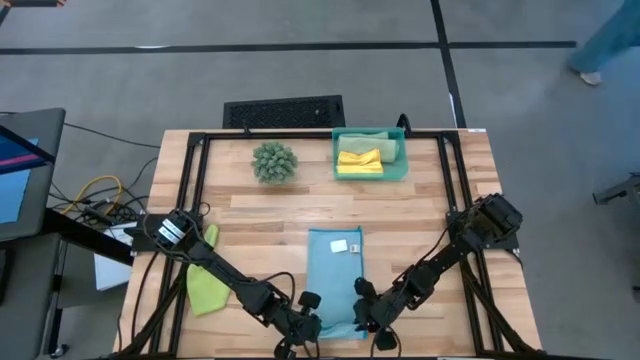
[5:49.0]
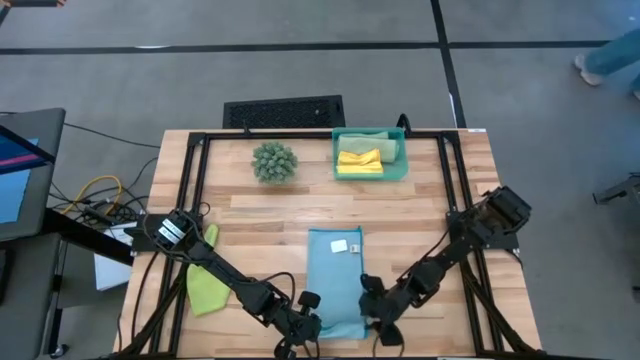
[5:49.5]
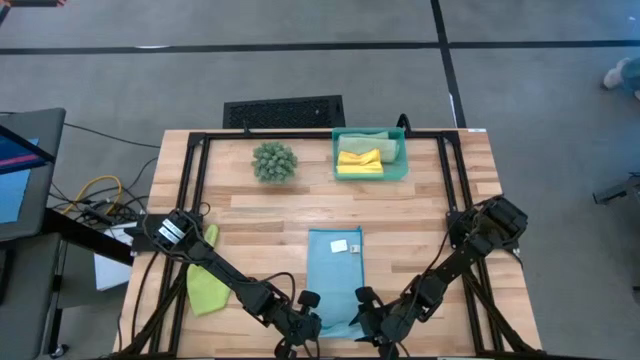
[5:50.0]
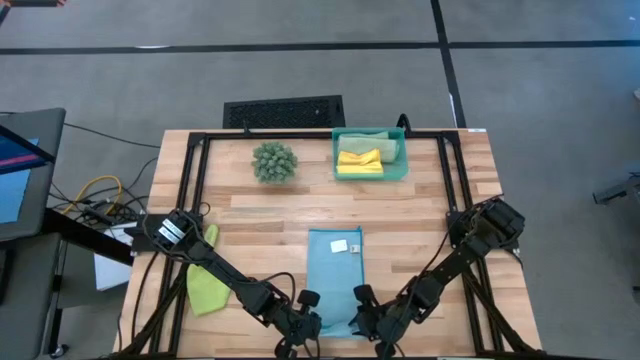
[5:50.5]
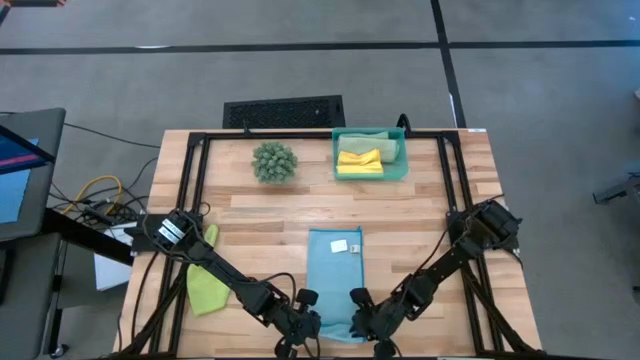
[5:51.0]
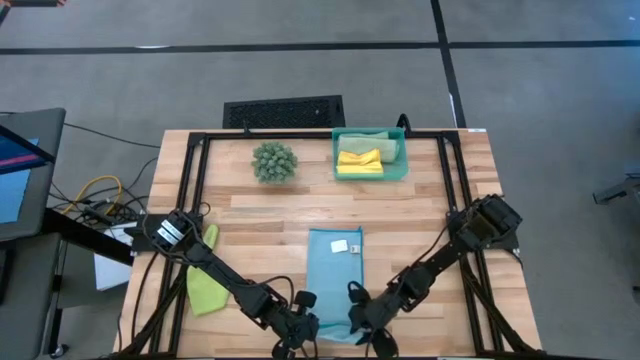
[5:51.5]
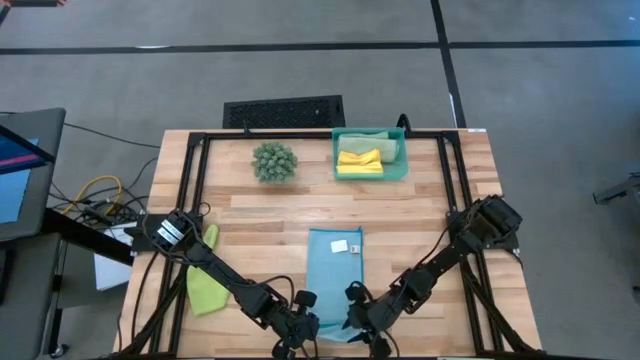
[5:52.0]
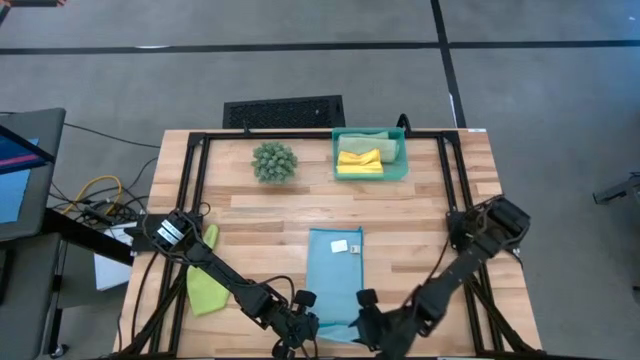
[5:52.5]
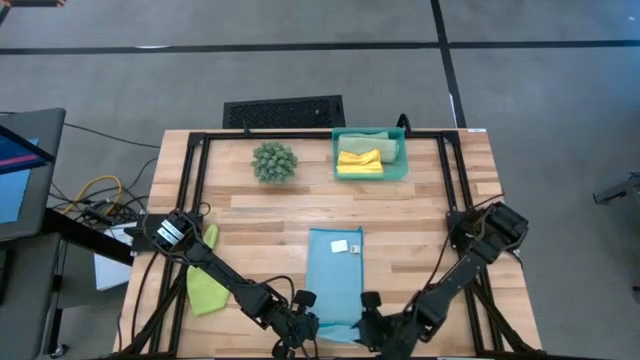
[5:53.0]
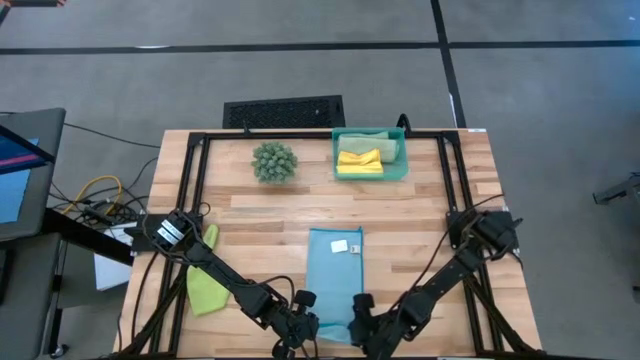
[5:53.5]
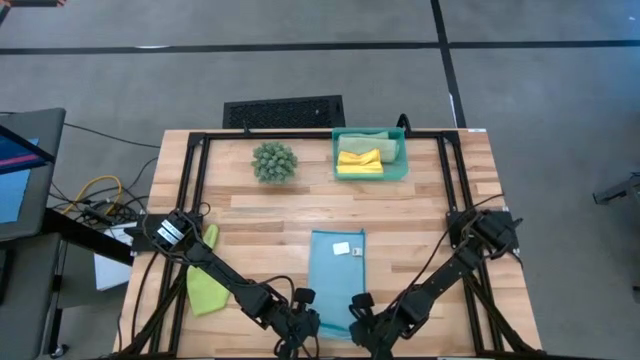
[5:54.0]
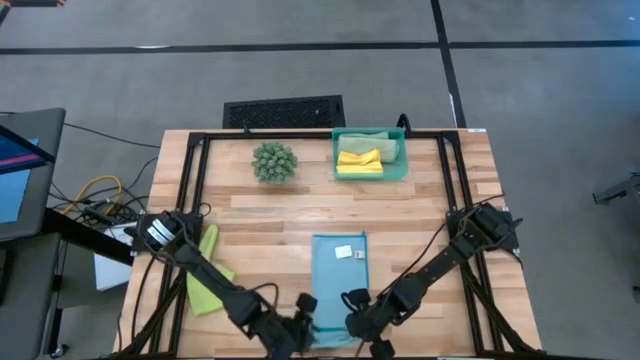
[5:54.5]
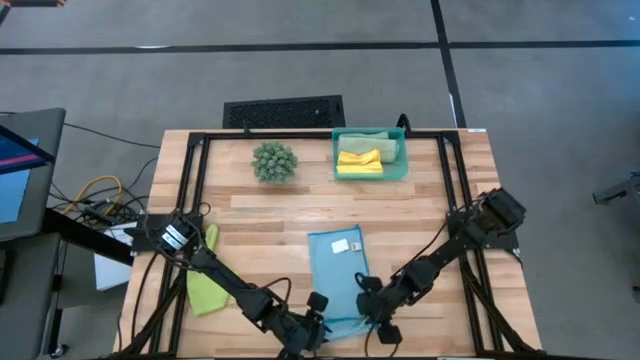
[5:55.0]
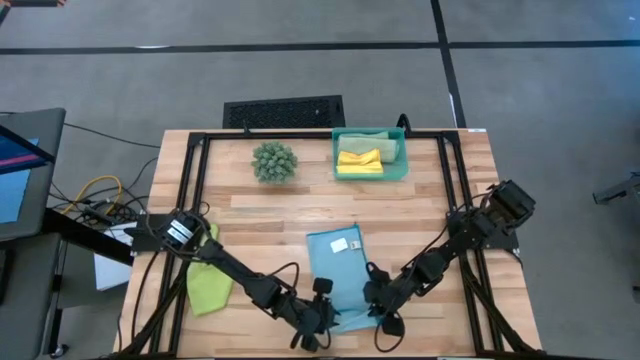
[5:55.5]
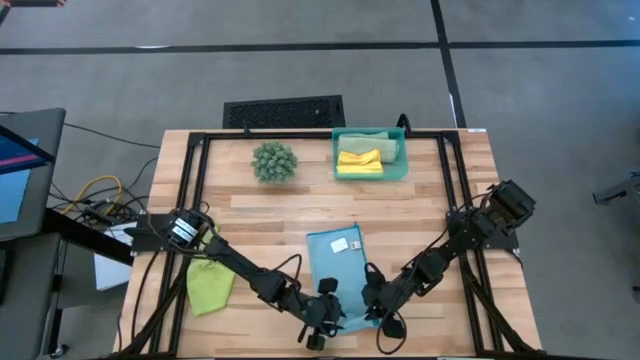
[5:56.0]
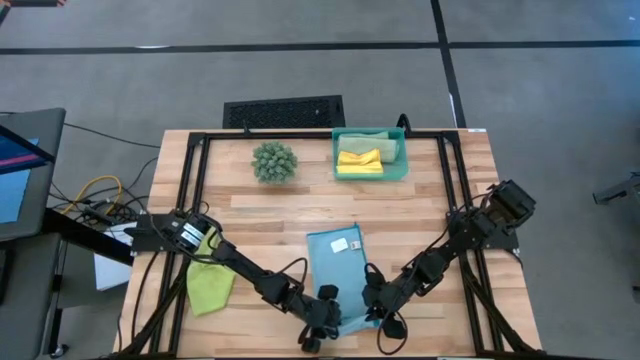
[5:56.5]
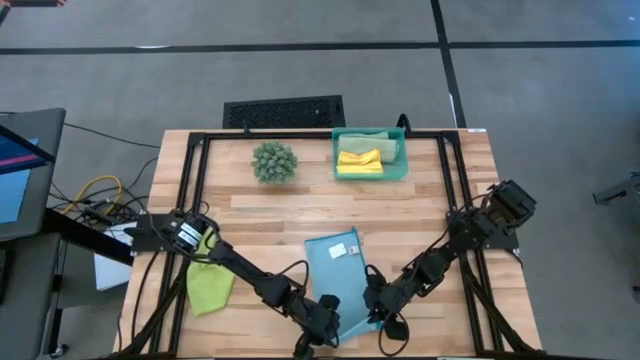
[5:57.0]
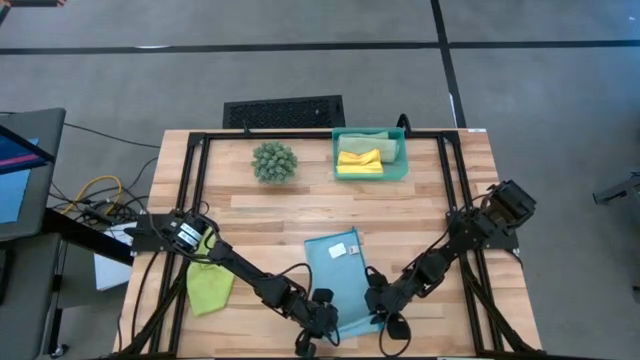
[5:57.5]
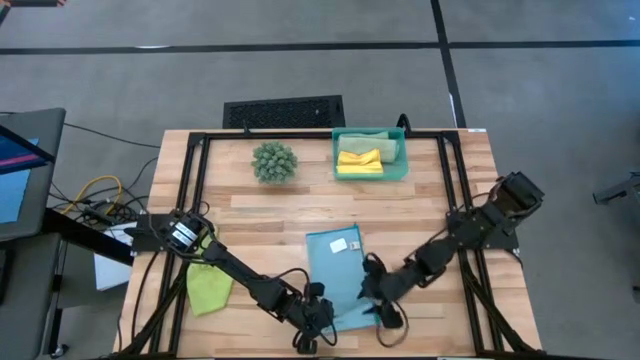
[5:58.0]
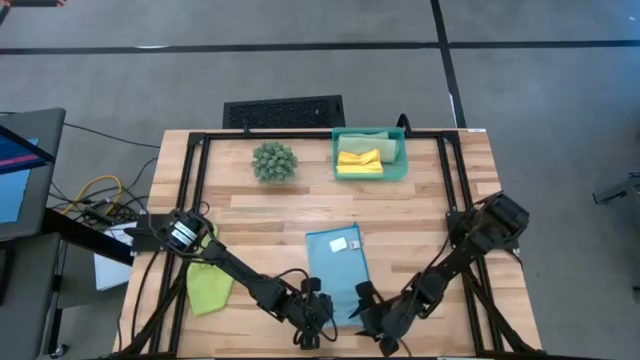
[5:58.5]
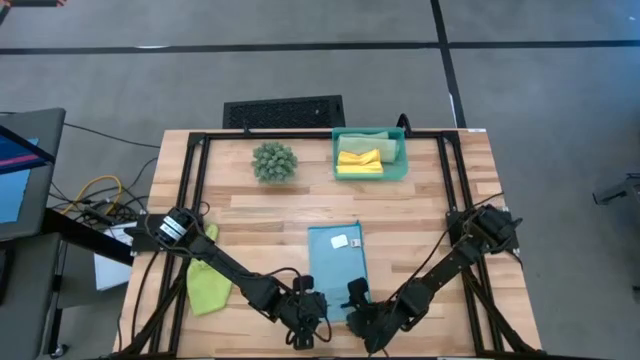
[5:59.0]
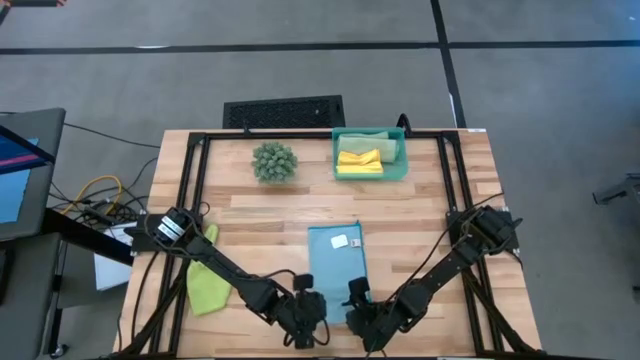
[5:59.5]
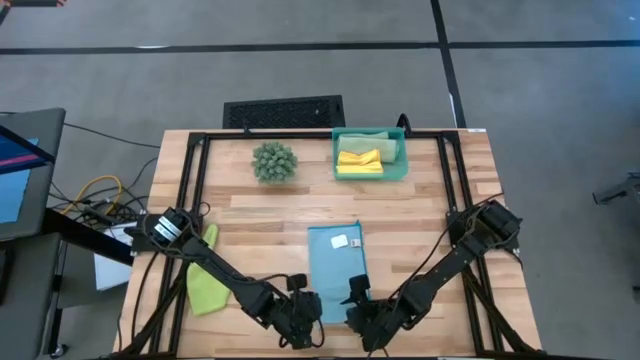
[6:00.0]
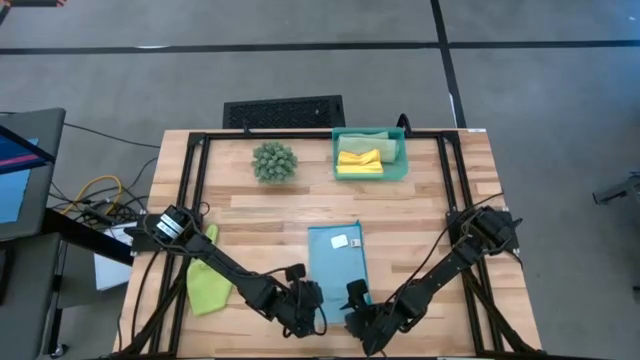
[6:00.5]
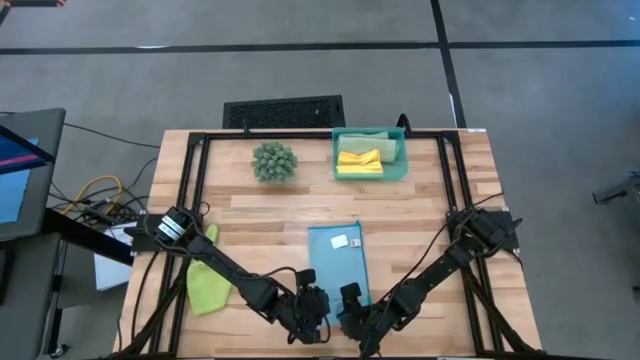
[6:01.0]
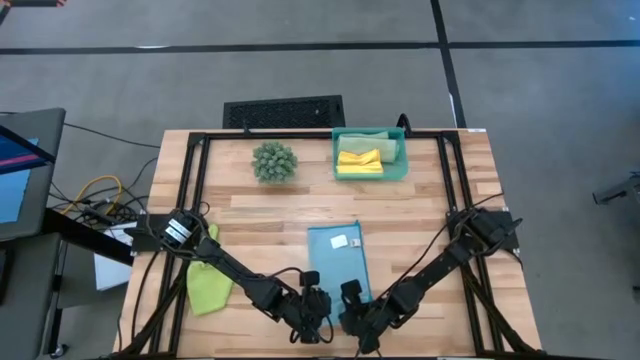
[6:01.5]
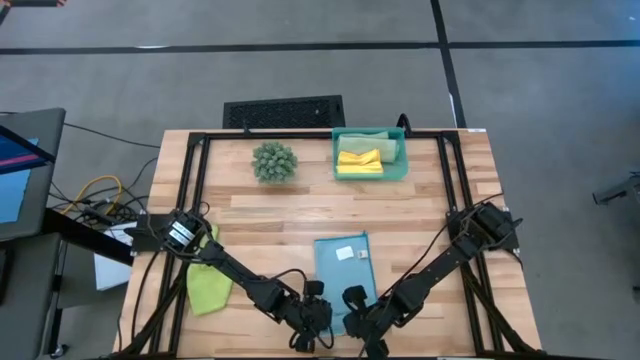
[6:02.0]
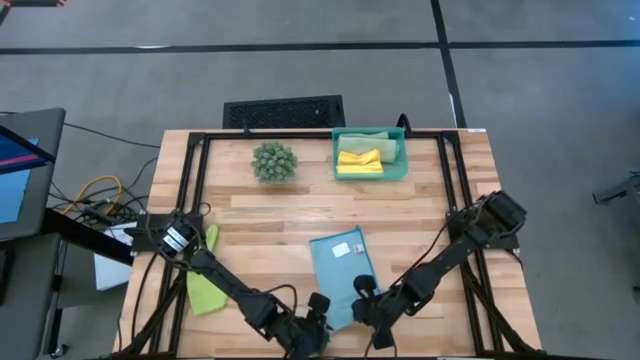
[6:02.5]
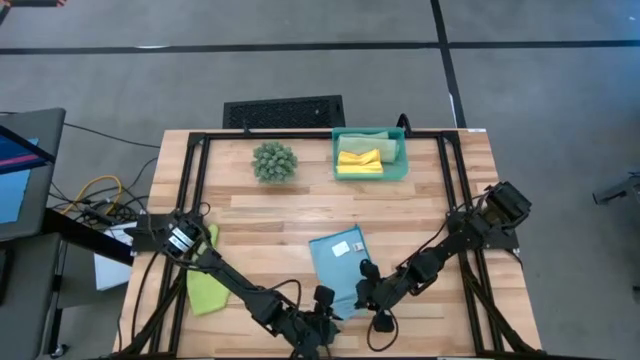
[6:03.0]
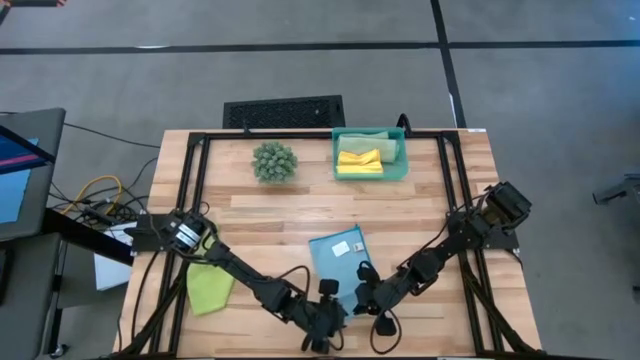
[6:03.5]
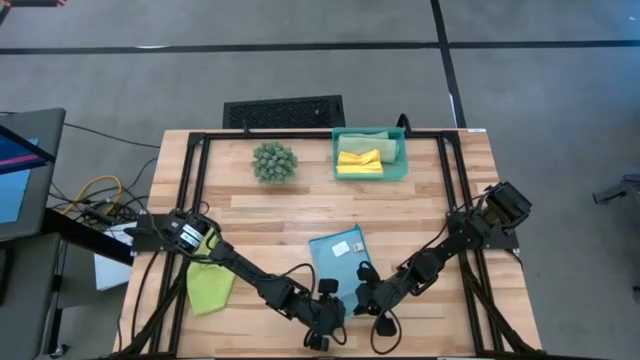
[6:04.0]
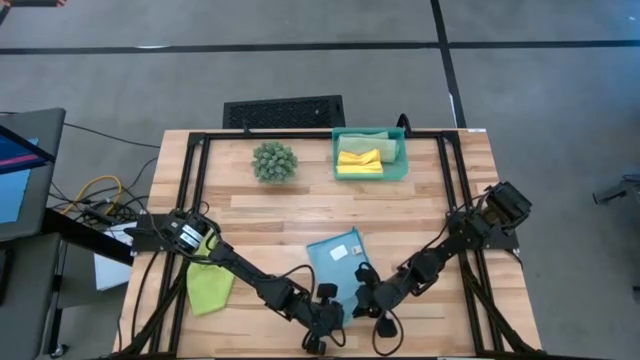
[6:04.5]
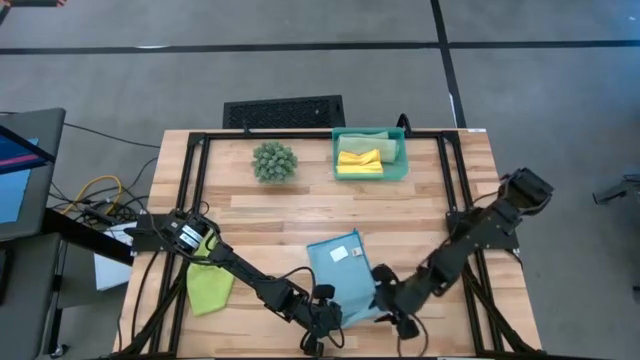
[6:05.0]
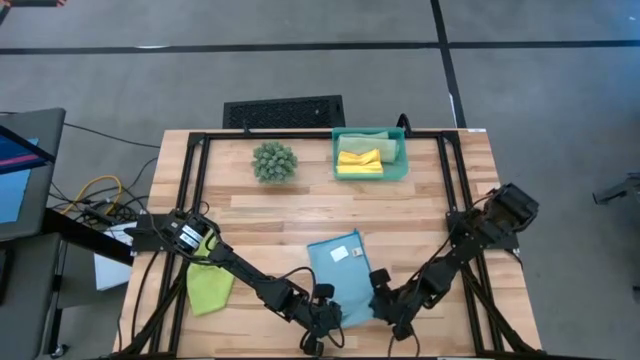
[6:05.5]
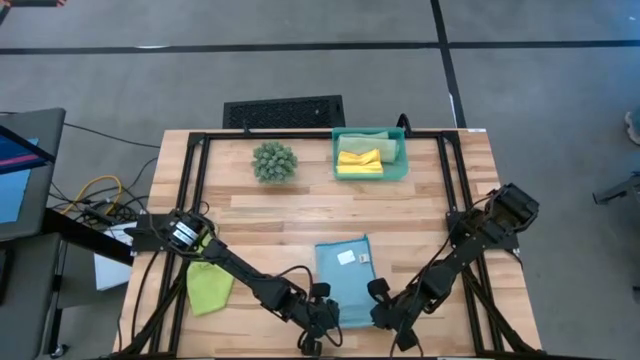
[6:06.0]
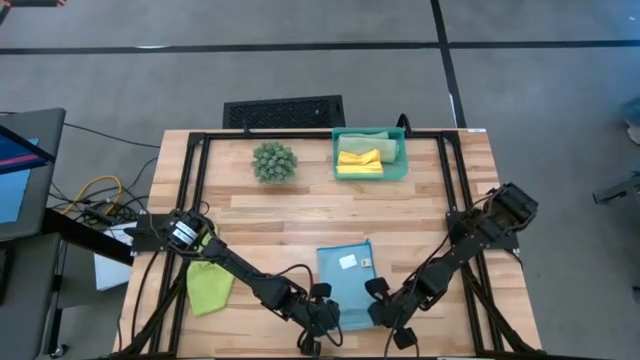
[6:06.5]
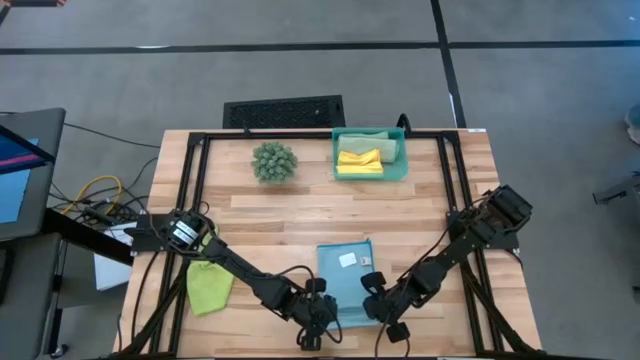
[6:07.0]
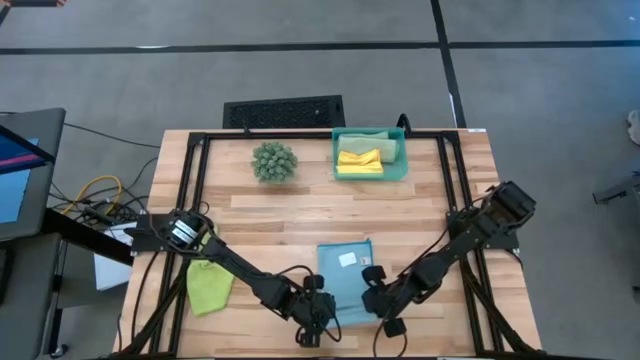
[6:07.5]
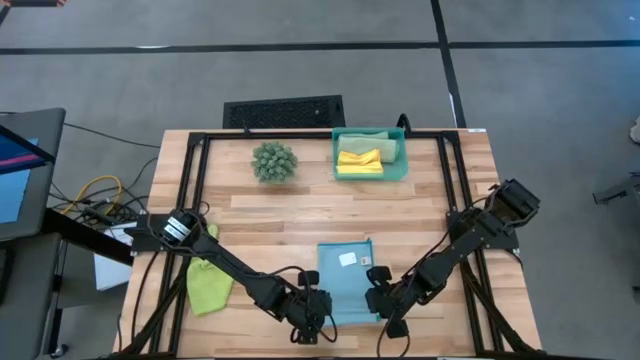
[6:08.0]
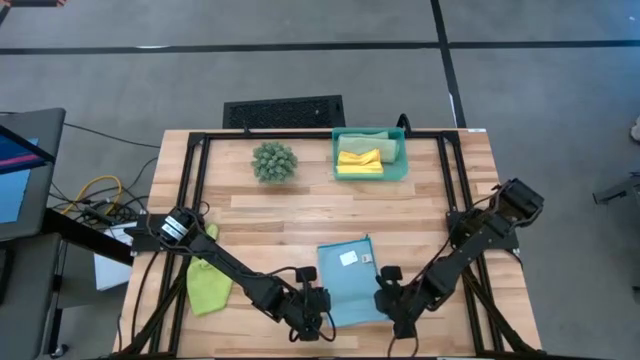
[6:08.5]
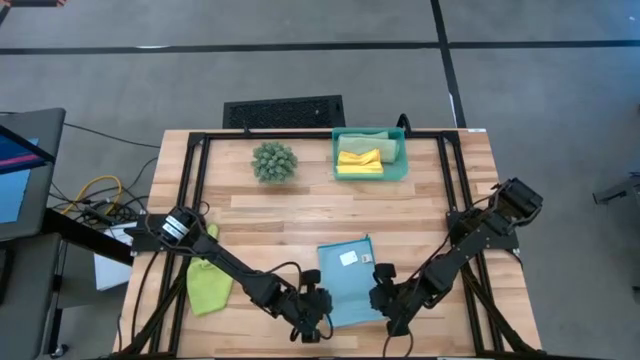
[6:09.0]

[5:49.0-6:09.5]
Task: Roll microfiber towels into tight, uniform cylinder then place into a basket
Roll the blue microfiber cloth
